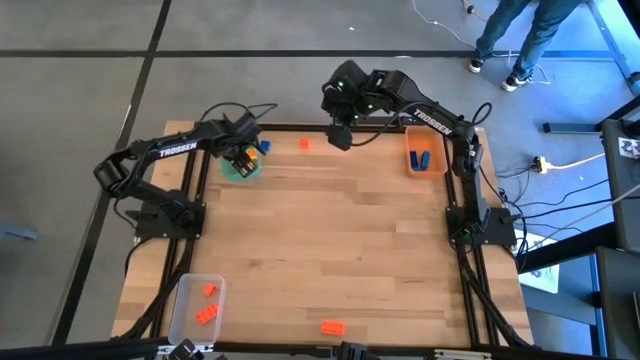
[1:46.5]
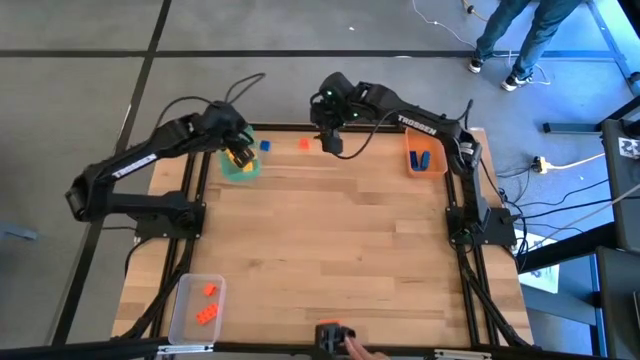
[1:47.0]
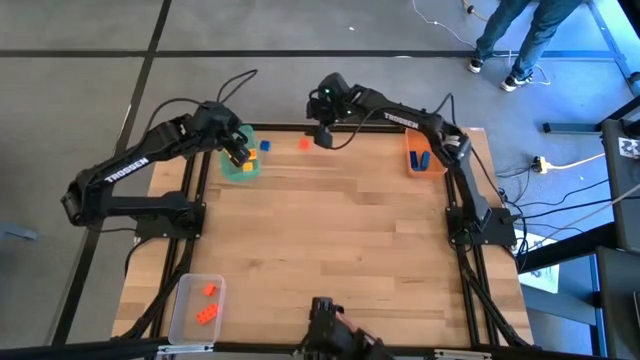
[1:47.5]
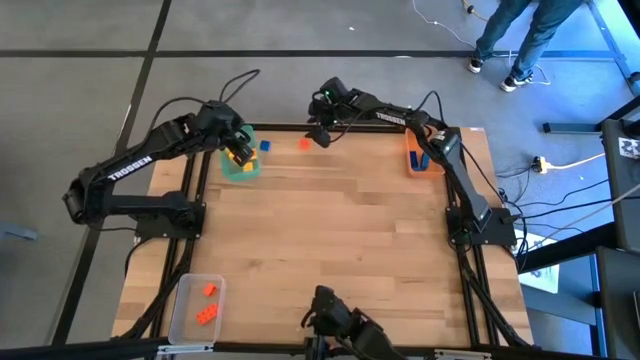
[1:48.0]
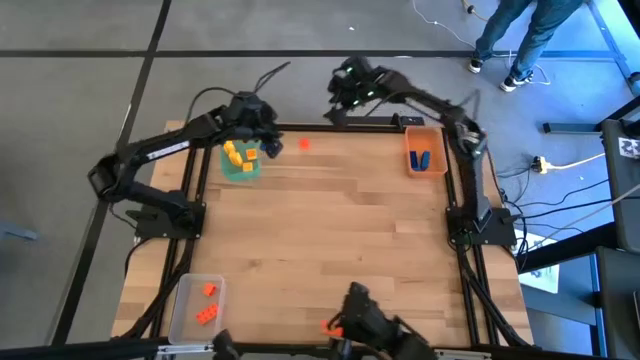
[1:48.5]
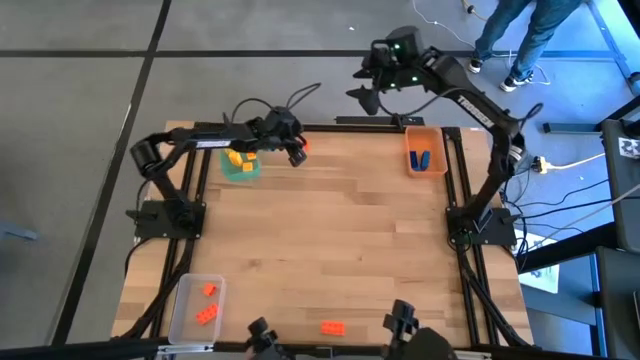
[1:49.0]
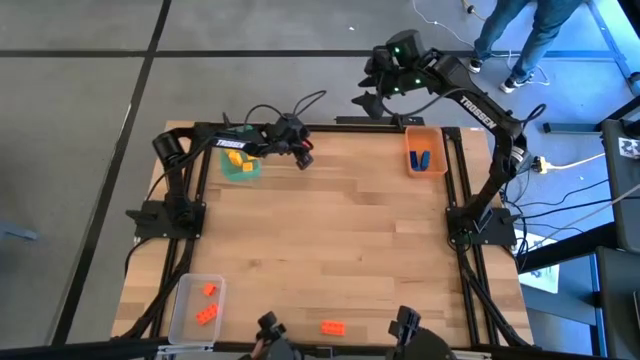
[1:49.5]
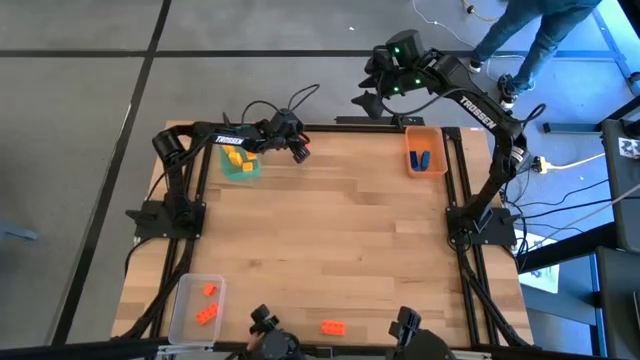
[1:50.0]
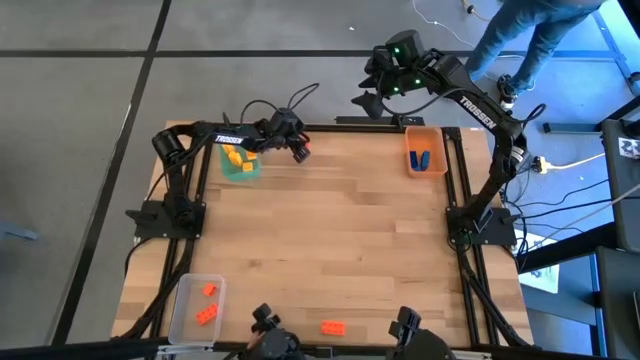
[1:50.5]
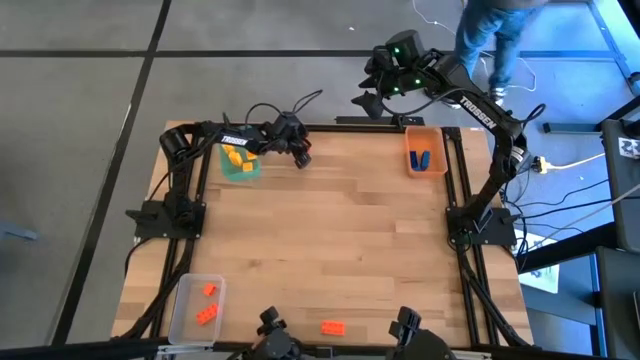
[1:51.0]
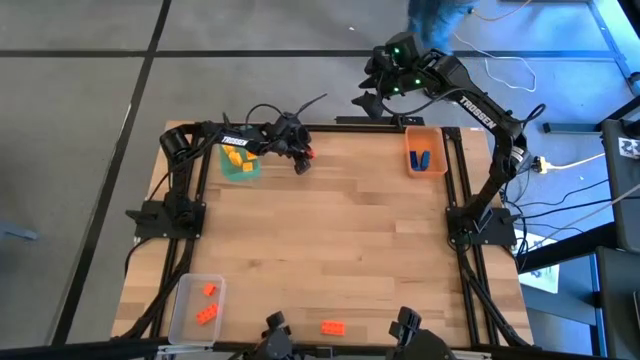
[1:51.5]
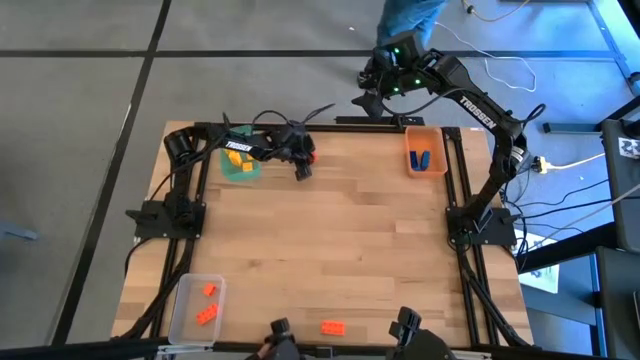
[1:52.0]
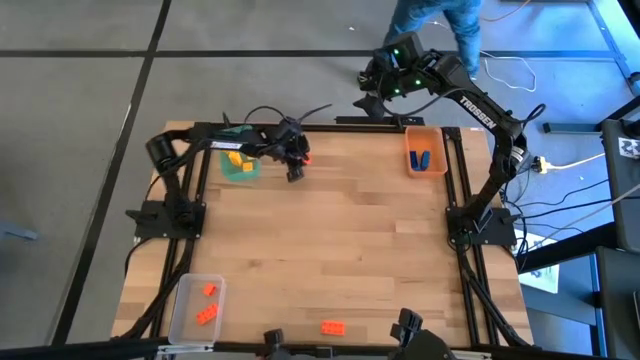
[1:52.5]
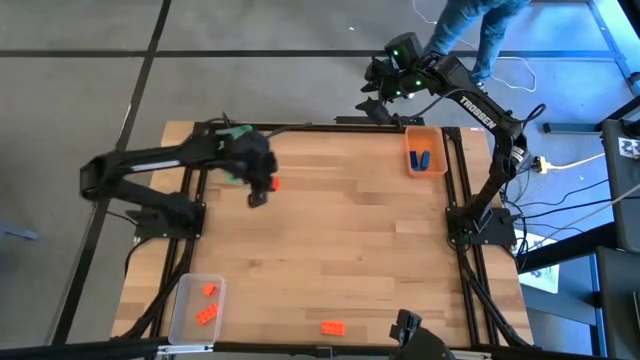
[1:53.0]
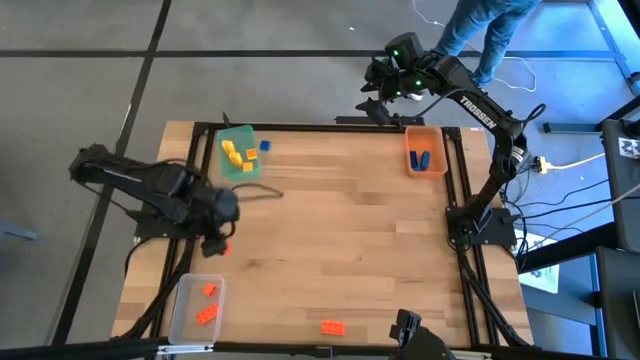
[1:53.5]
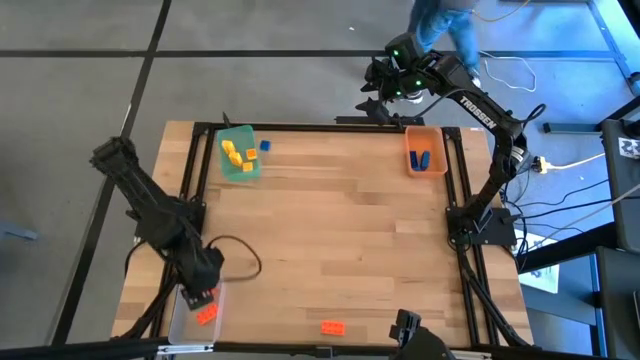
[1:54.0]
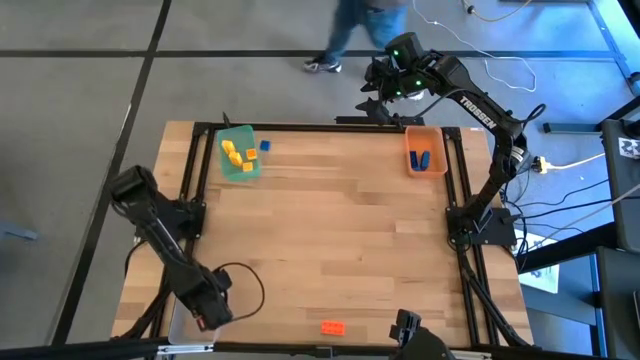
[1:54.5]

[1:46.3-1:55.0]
Task: Sort & place blocks by color
Put the orange game piece into the transparent bin

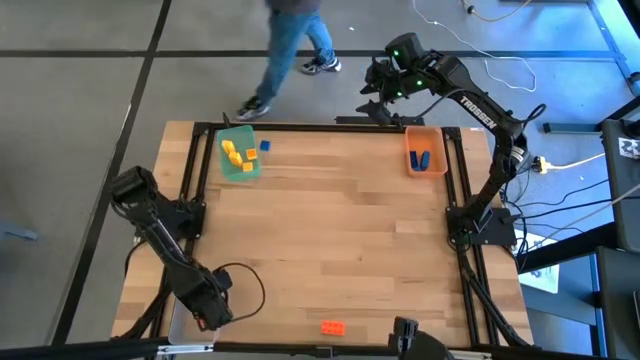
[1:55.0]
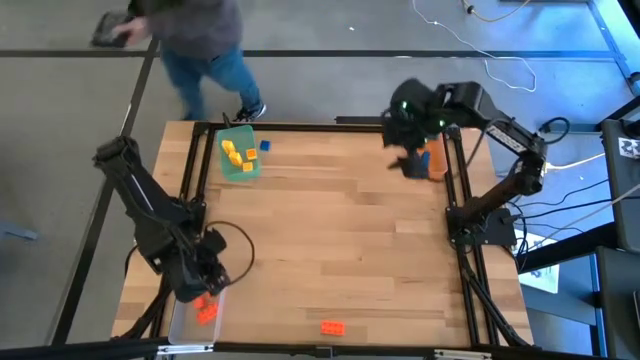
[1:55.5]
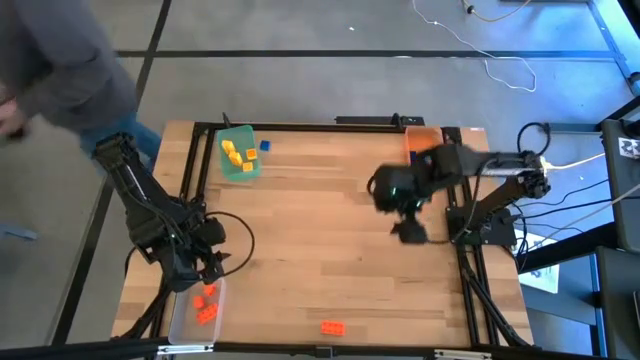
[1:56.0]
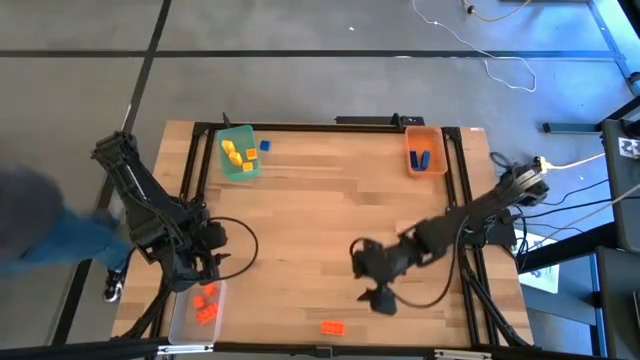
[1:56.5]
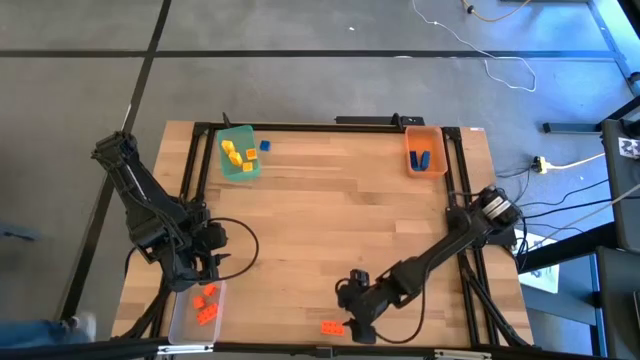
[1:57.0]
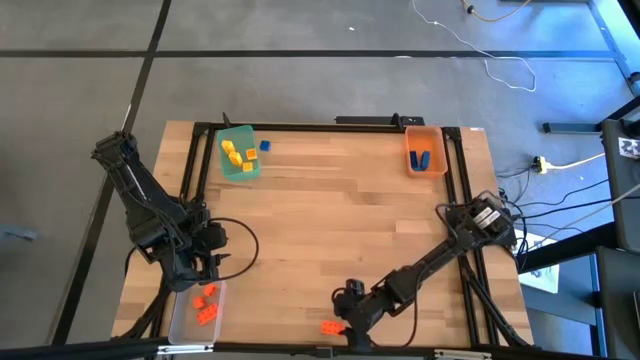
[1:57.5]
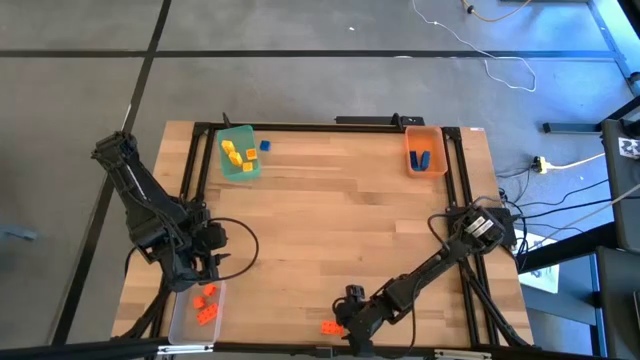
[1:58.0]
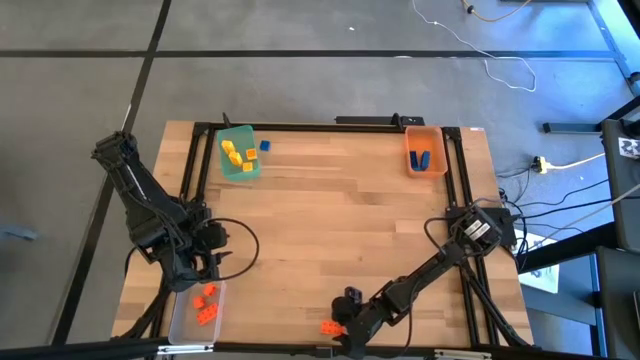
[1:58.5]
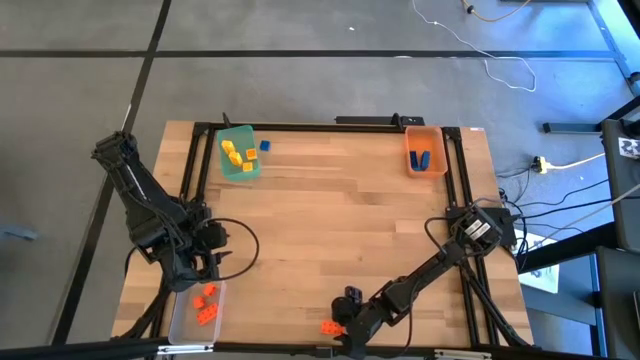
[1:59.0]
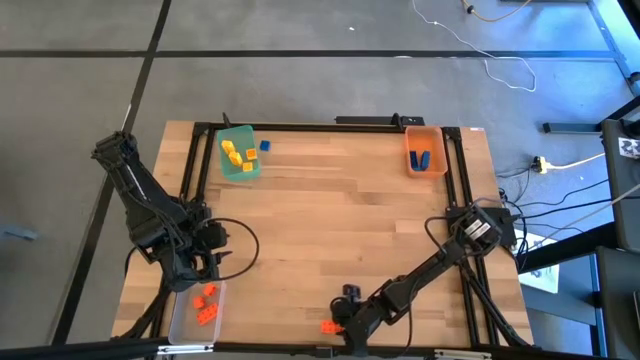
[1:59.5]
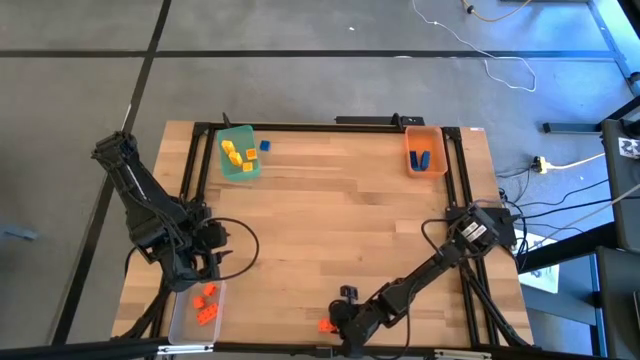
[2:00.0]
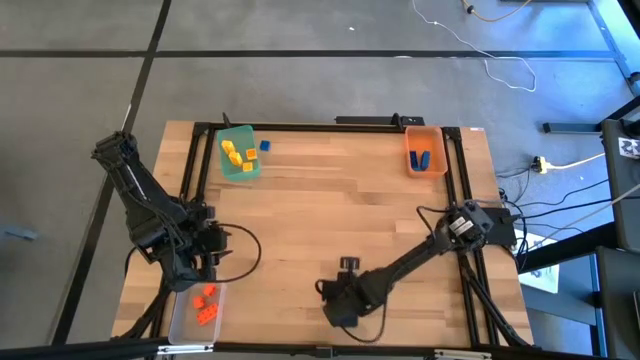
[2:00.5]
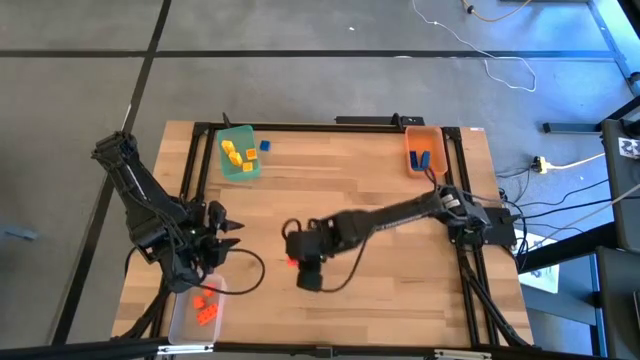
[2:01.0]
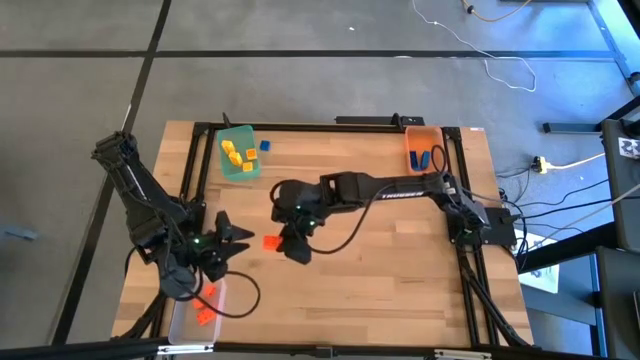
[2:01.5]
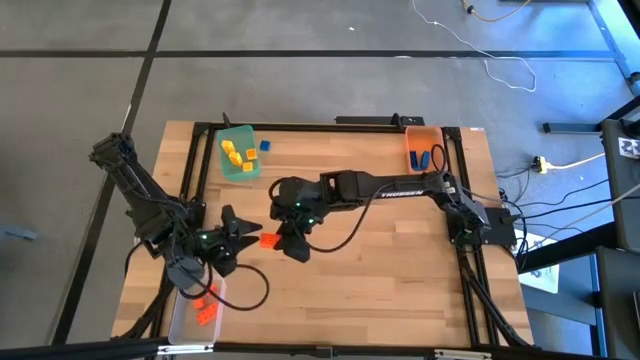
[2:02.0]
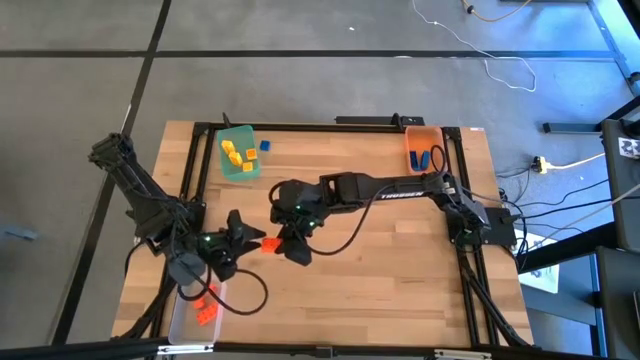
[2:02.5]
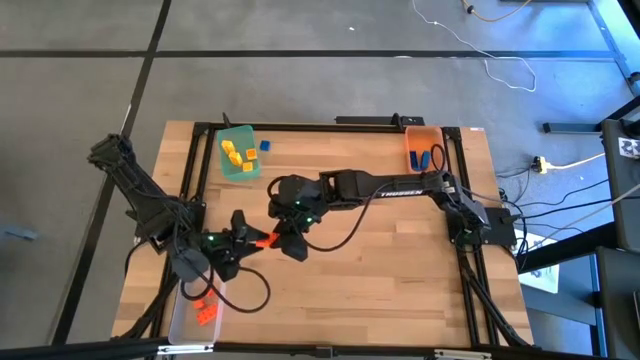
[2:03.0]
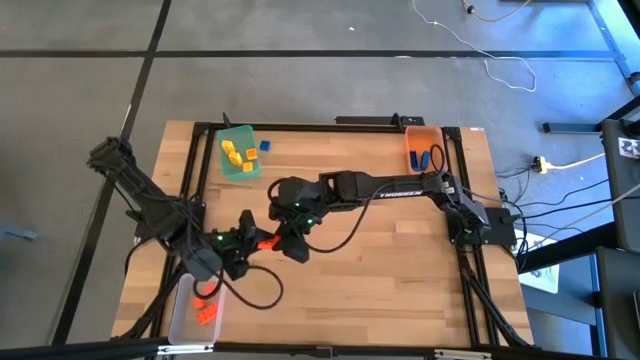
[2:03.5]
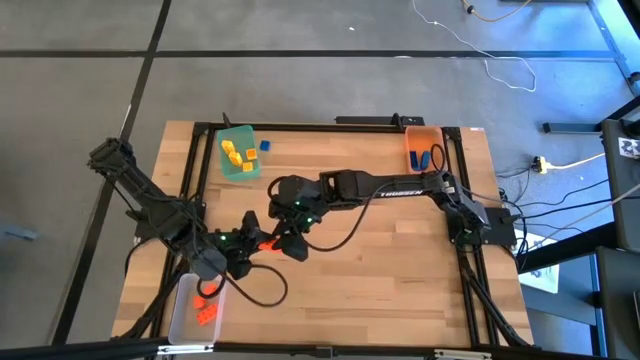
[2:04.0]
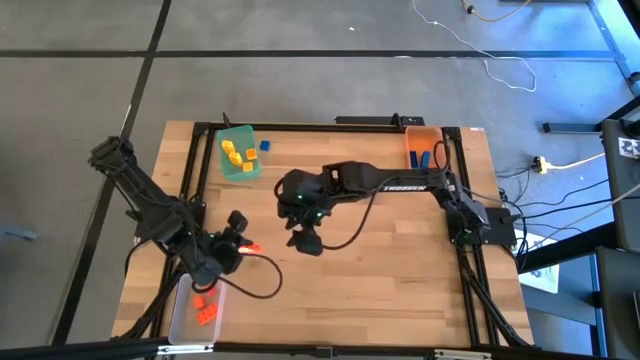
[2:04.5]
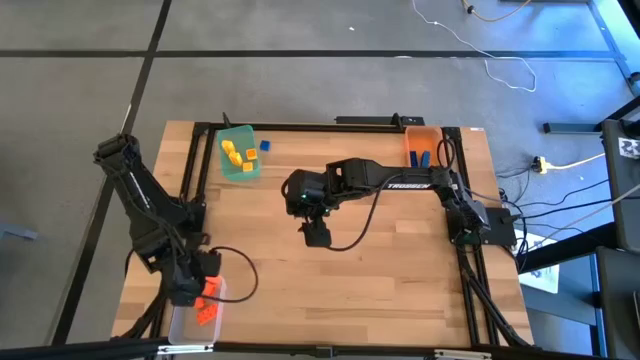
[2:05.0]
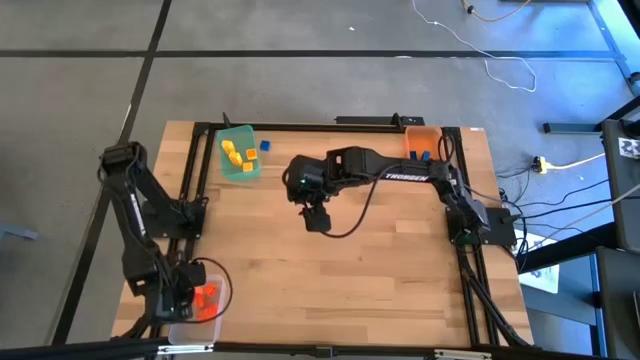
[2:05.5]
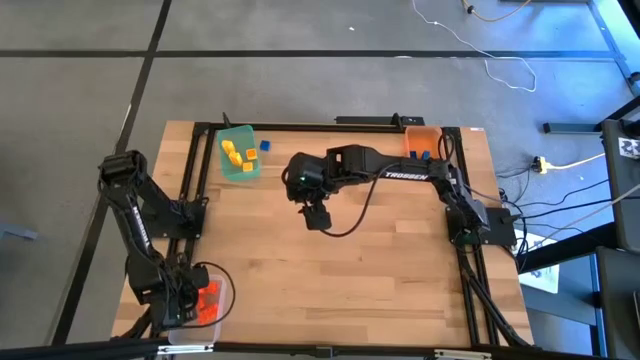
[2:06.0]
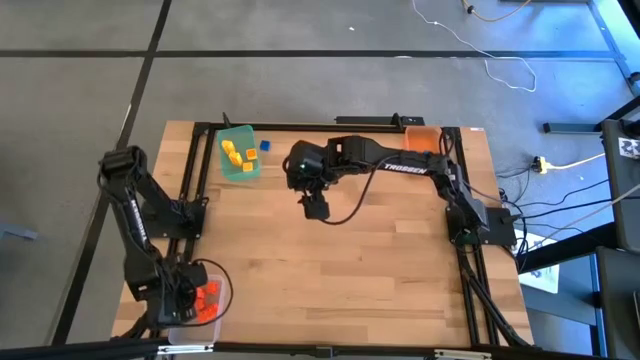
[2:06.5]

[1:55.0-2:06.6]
Put the orange game piece into the transparent bin
